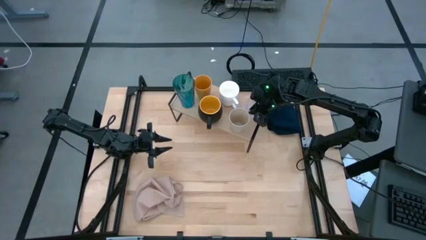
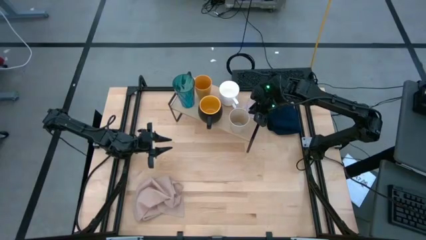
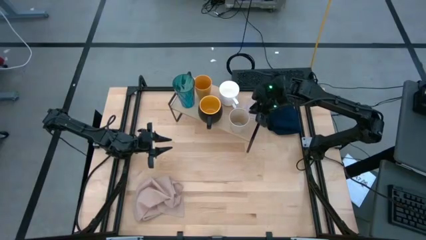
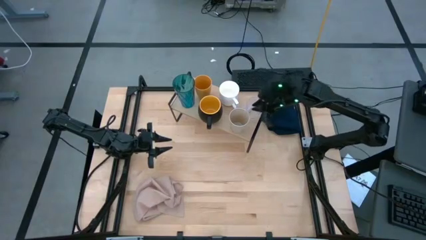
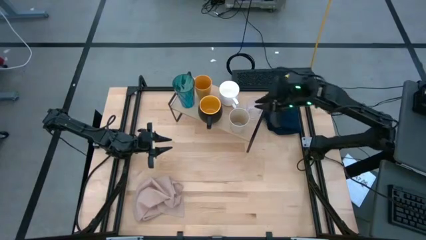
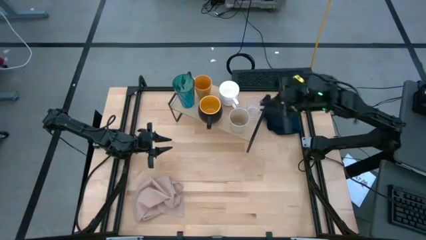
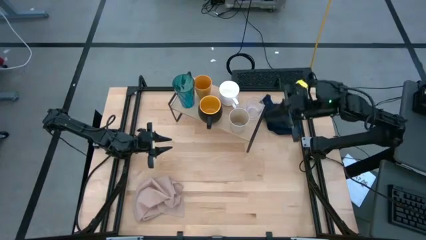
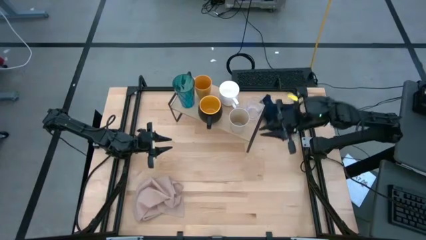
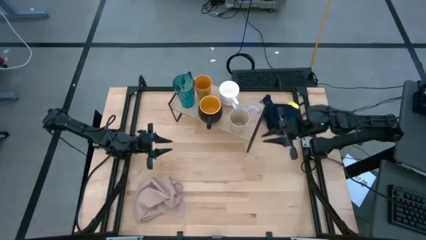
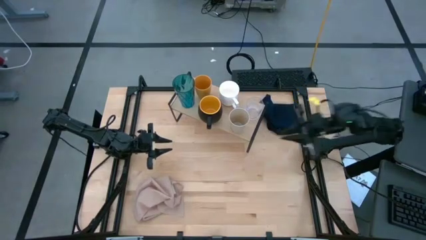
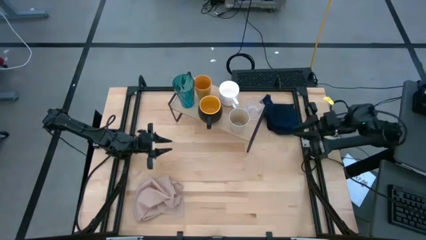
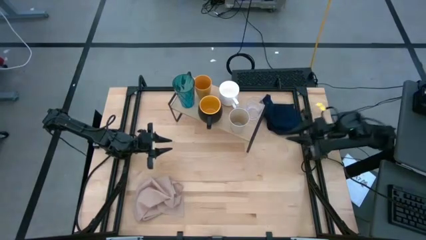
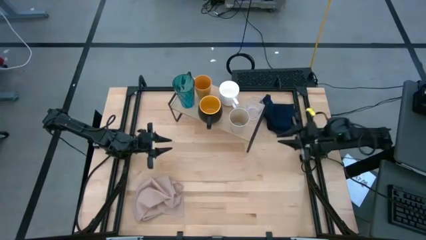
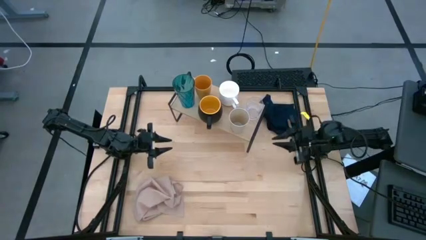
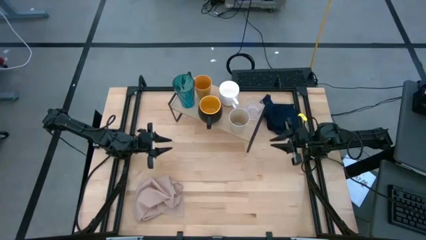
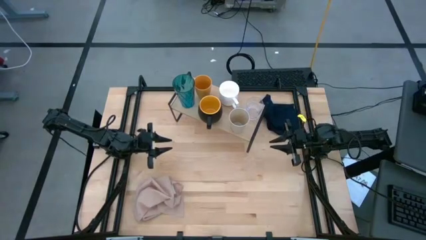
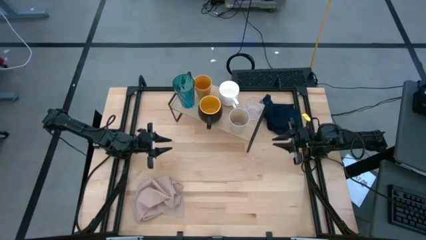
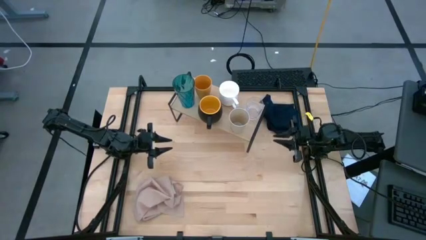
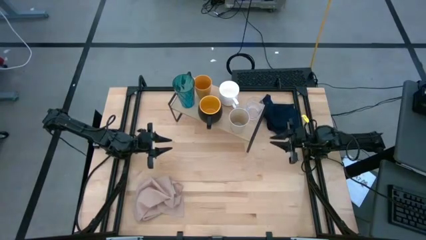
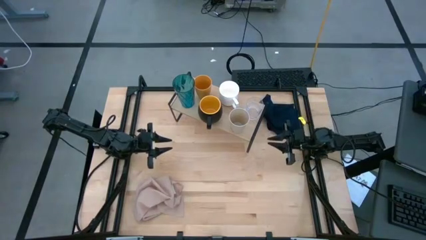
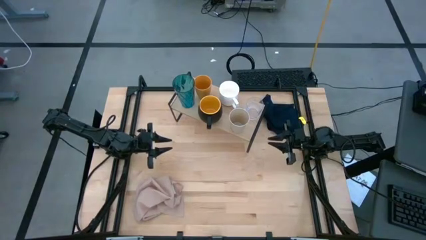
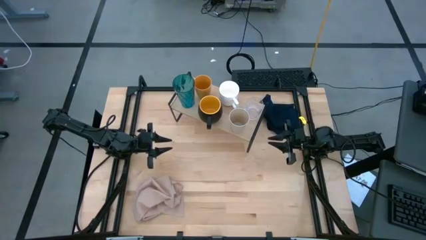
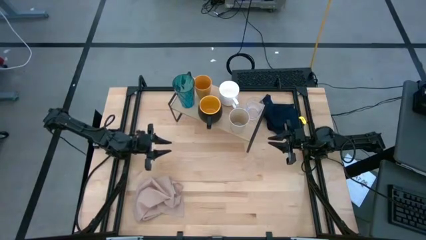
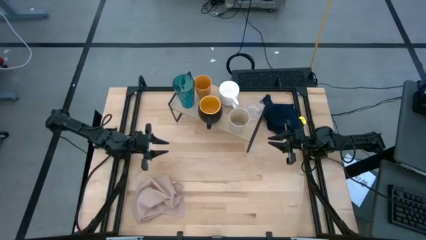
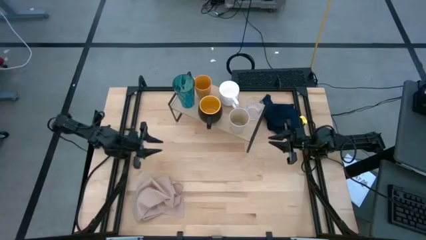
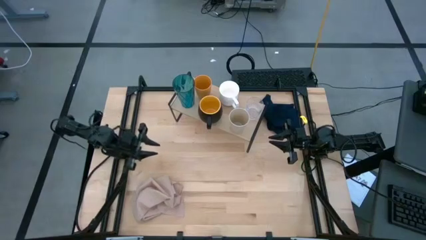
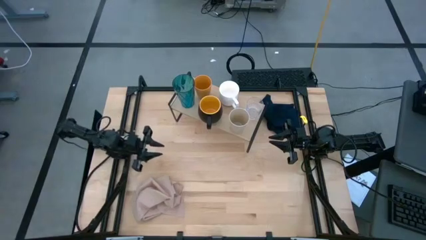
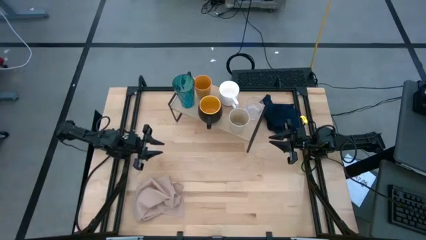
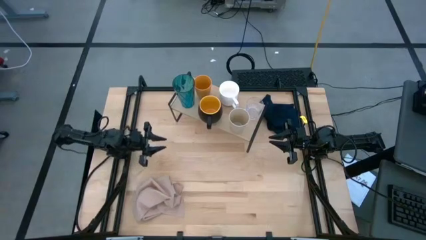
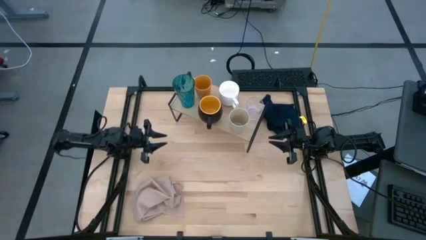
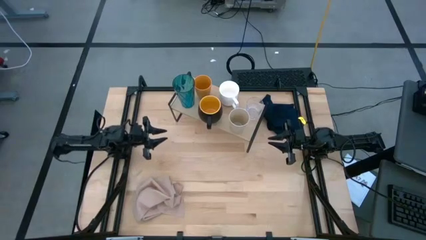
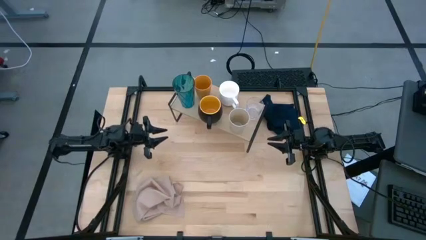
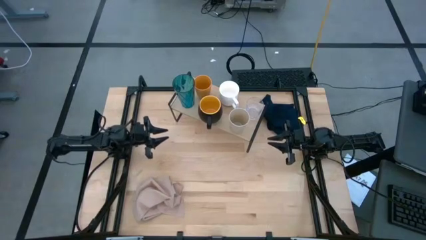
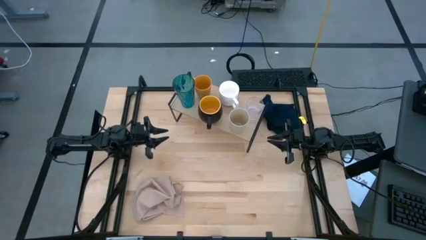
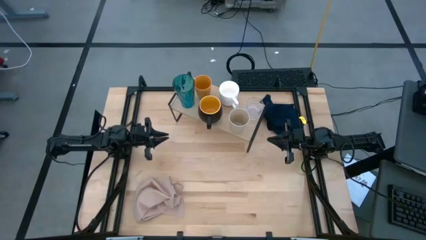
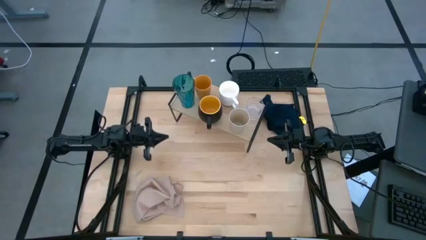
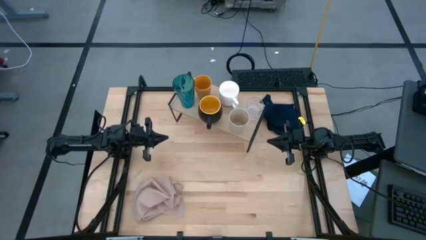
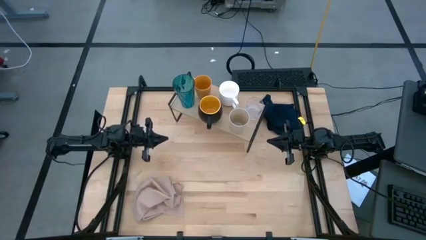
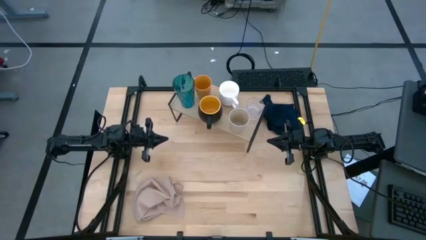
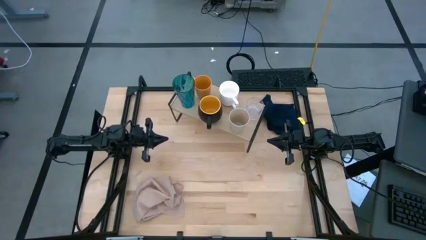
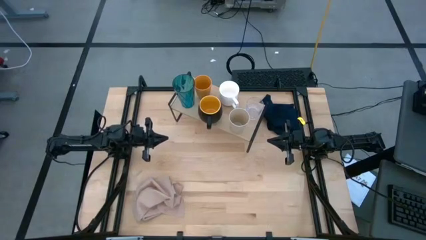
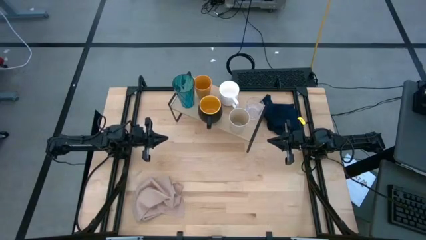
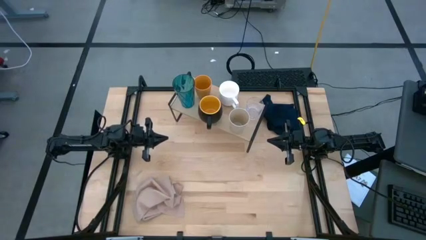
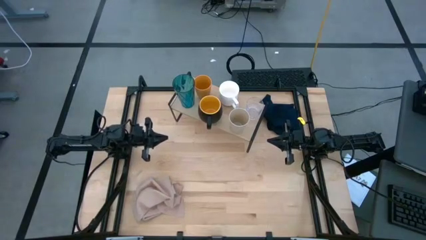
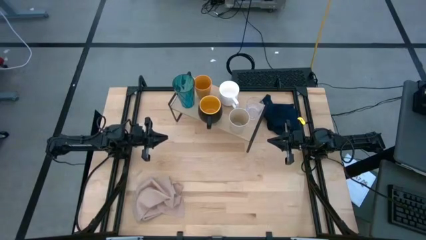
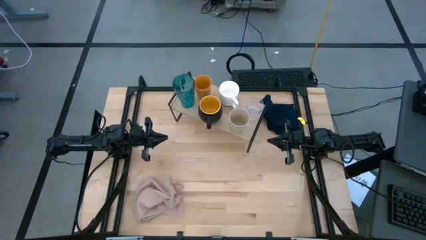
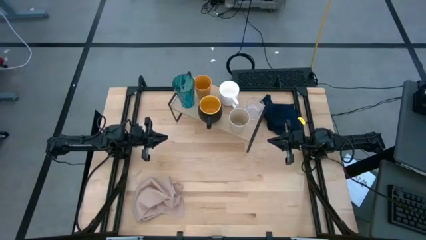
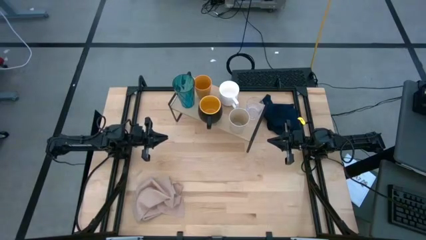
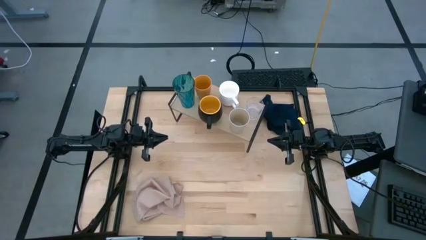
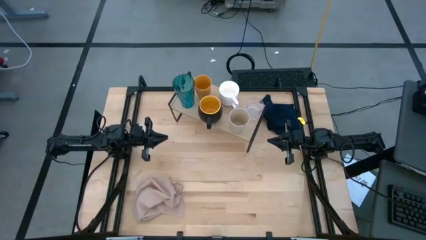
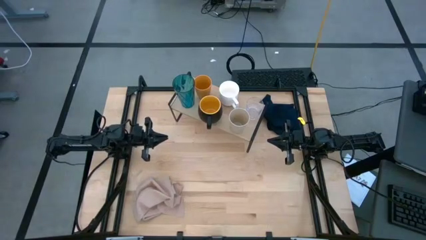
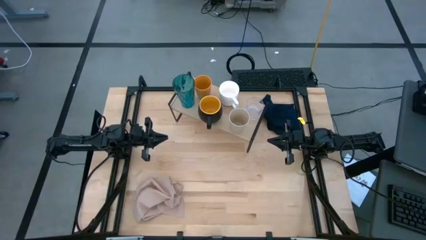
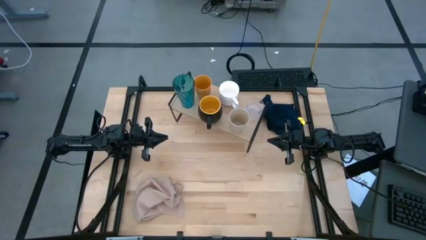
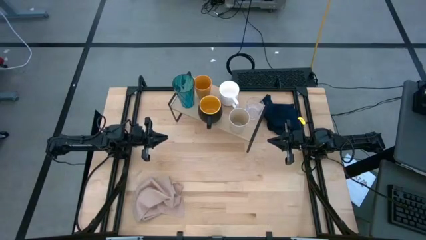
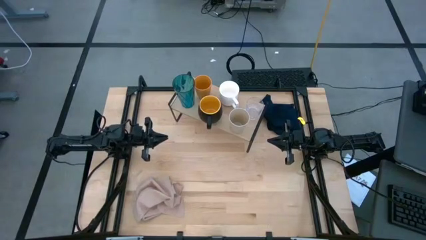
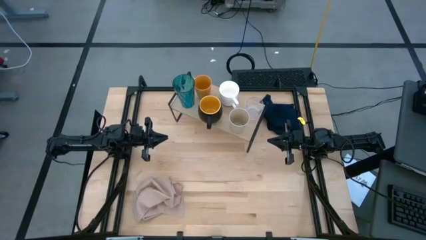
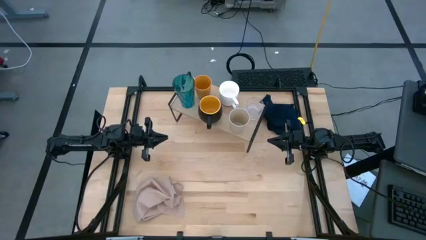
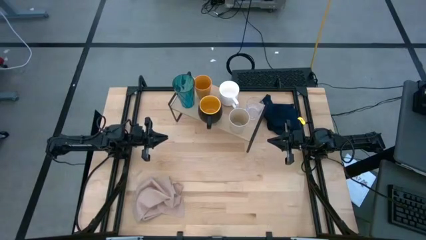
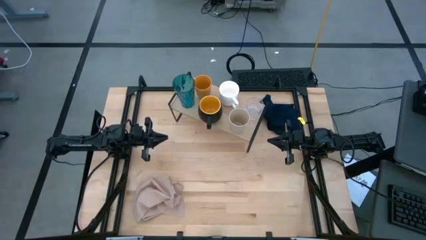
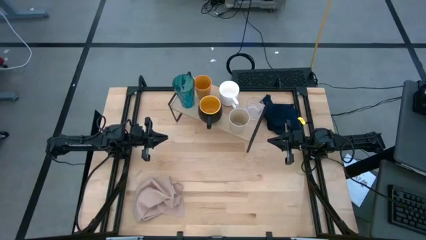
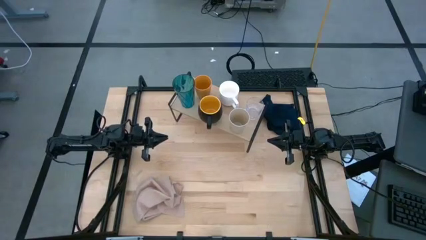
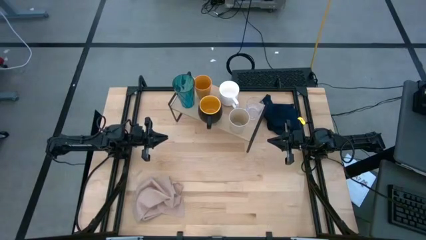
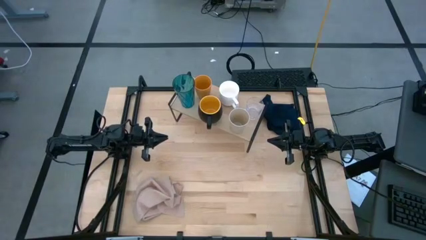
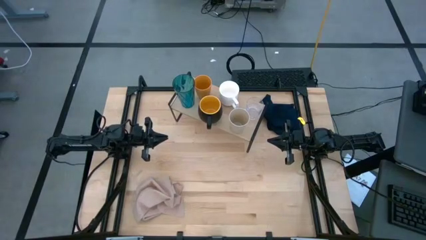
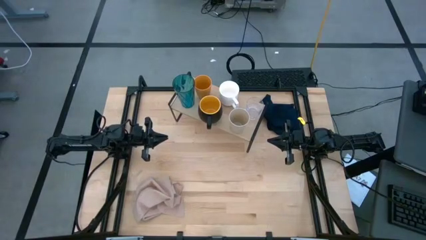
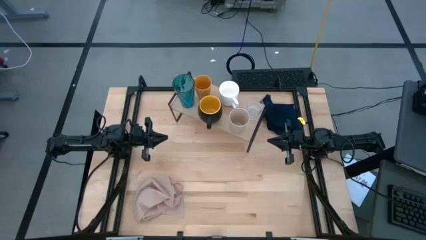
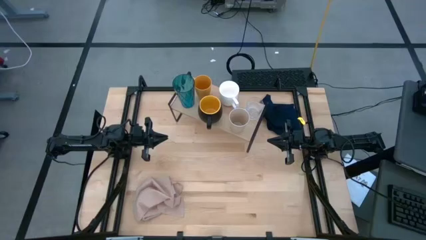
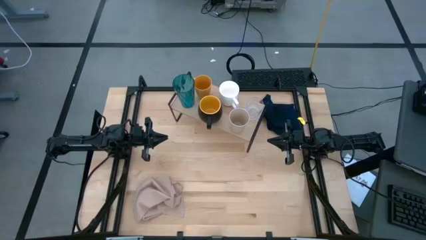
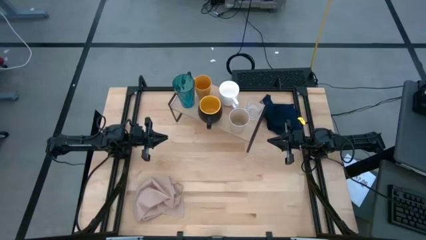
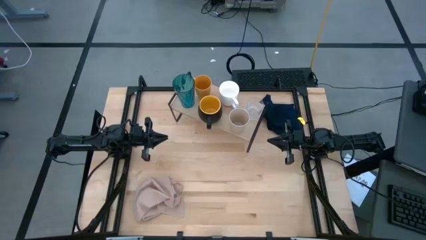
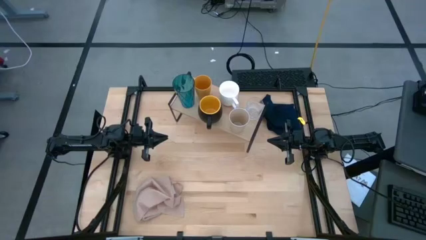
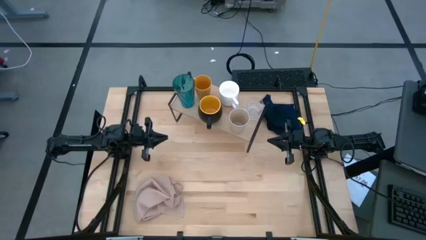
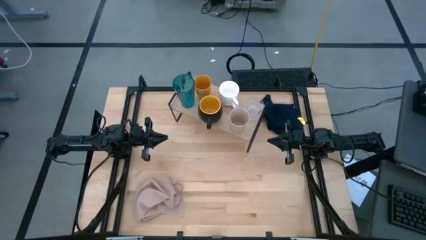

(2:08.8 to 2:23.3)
Task: Stack small to large cups/mugs on shelf
Return to Home Position
